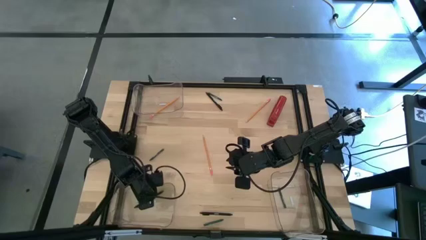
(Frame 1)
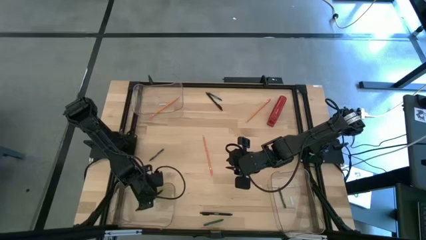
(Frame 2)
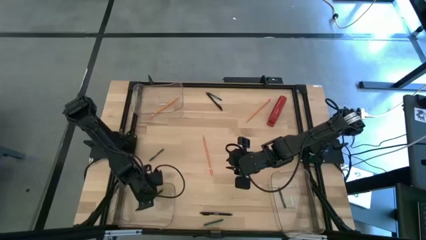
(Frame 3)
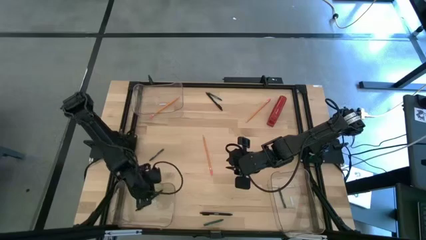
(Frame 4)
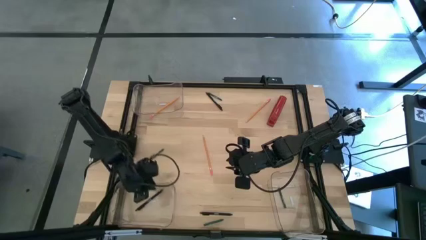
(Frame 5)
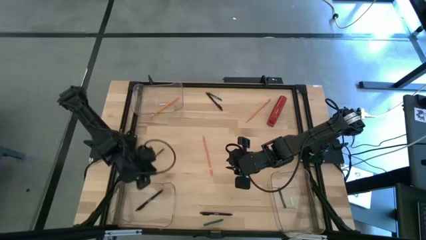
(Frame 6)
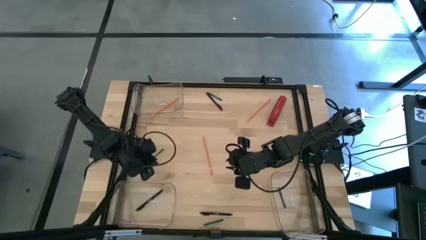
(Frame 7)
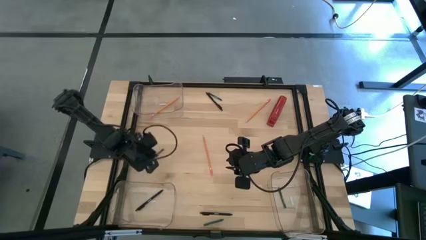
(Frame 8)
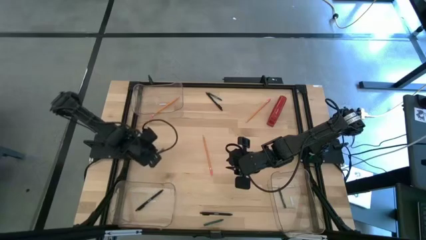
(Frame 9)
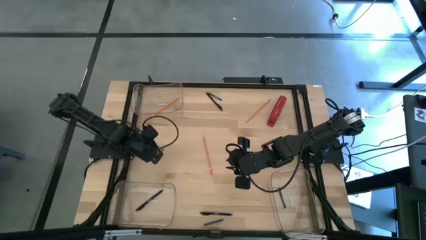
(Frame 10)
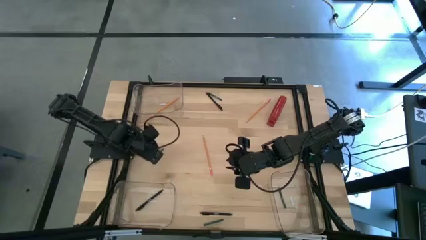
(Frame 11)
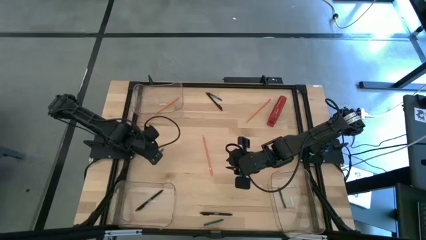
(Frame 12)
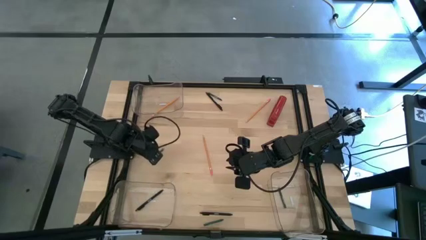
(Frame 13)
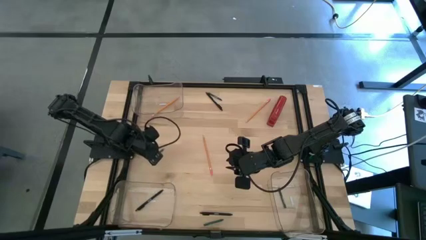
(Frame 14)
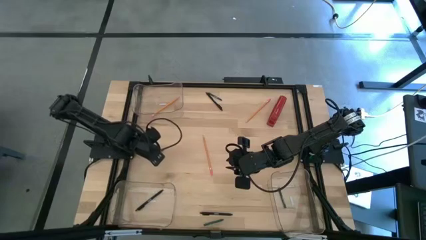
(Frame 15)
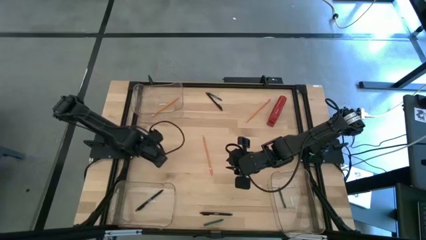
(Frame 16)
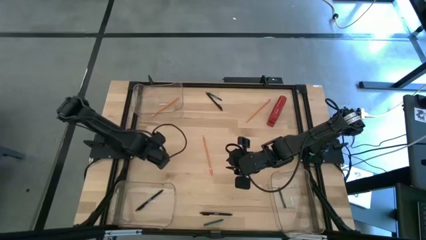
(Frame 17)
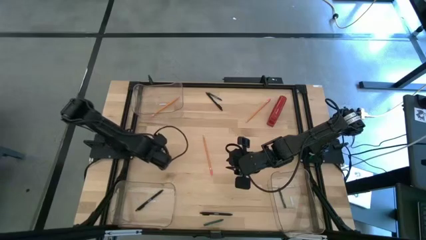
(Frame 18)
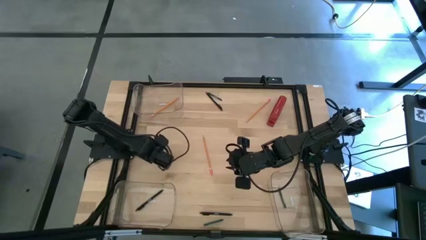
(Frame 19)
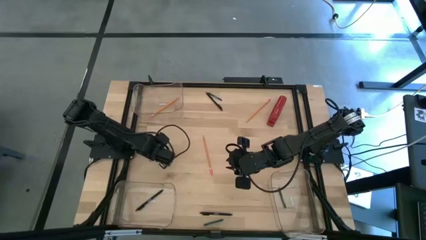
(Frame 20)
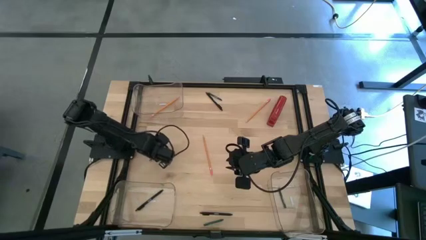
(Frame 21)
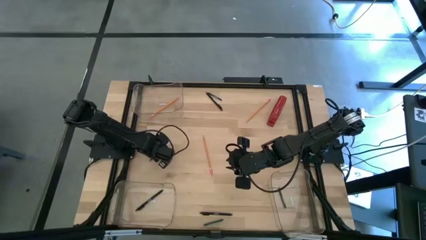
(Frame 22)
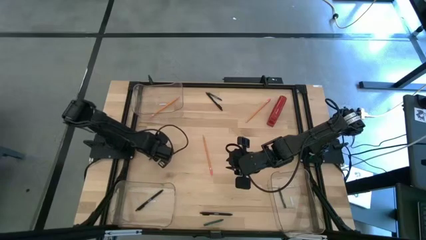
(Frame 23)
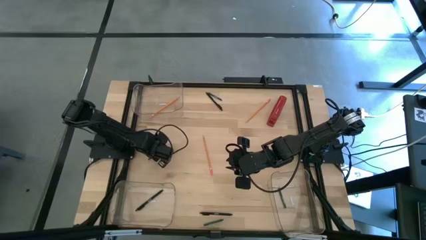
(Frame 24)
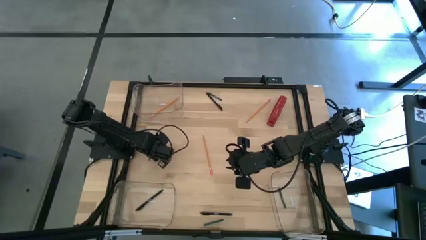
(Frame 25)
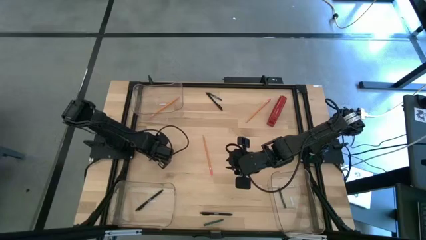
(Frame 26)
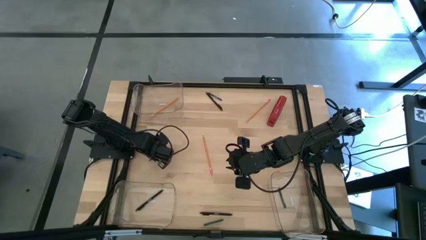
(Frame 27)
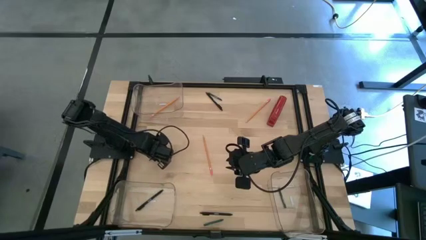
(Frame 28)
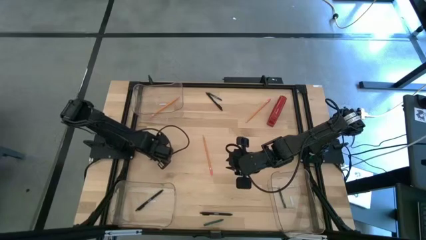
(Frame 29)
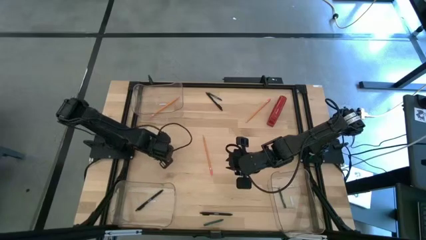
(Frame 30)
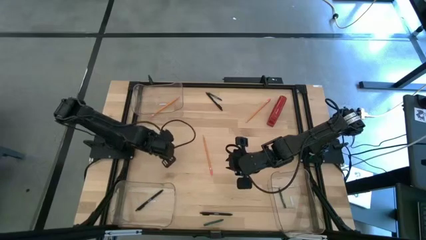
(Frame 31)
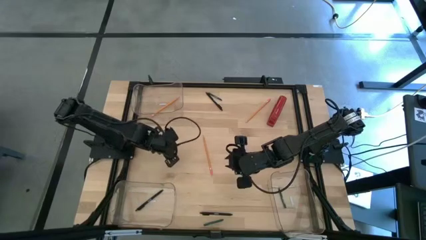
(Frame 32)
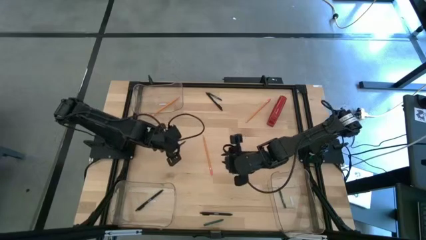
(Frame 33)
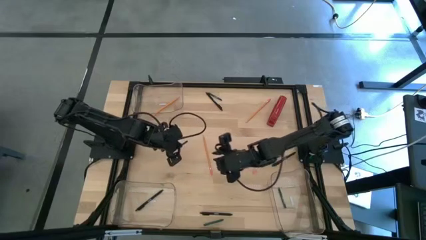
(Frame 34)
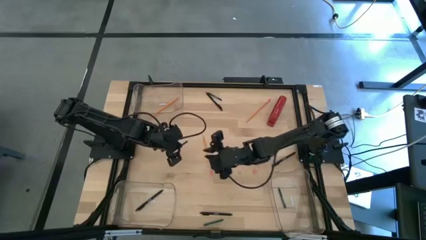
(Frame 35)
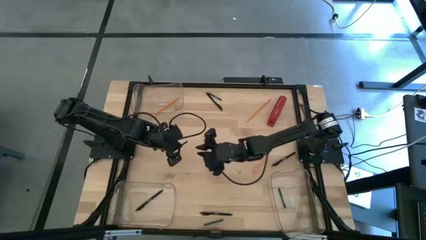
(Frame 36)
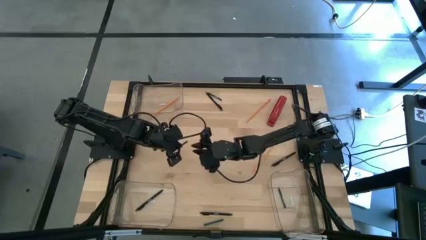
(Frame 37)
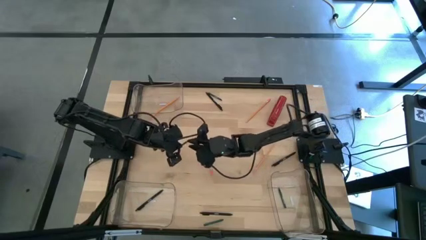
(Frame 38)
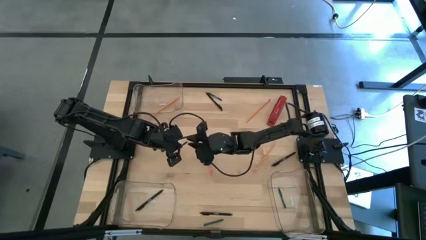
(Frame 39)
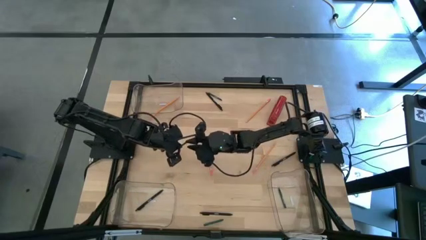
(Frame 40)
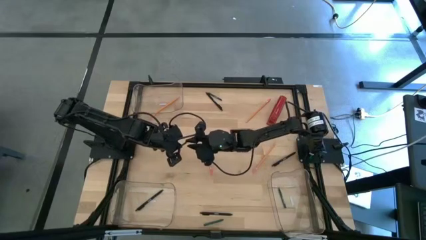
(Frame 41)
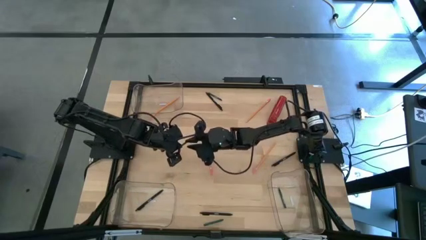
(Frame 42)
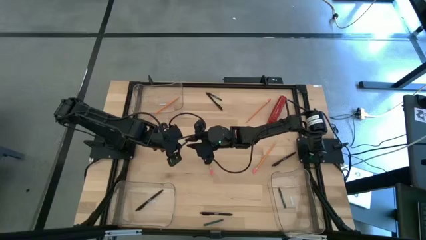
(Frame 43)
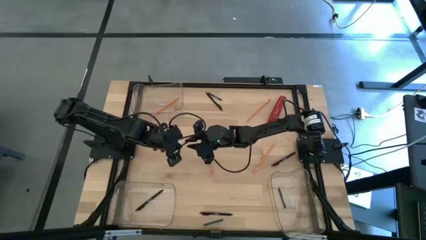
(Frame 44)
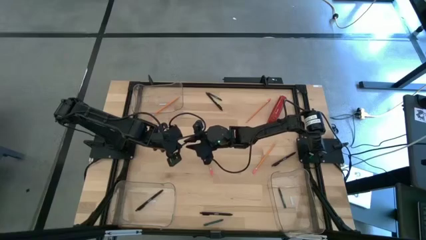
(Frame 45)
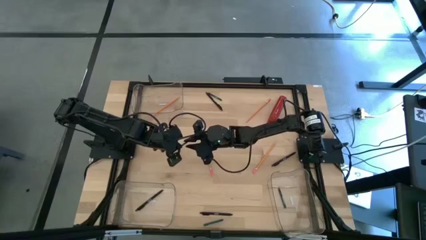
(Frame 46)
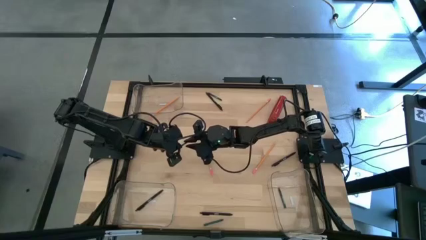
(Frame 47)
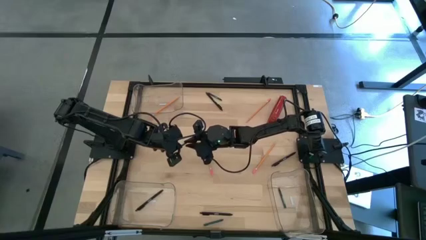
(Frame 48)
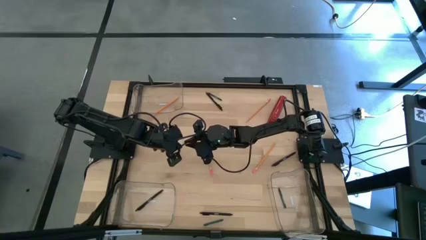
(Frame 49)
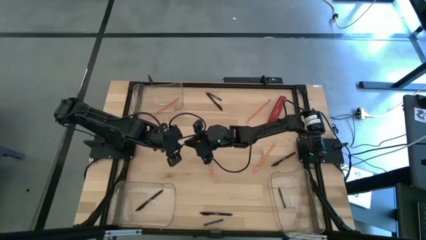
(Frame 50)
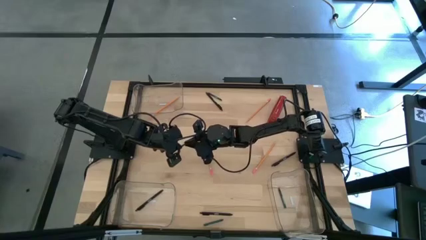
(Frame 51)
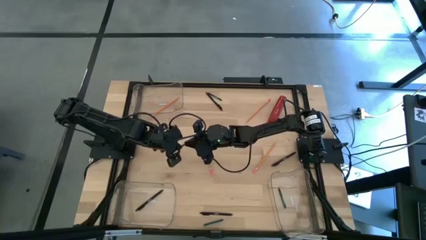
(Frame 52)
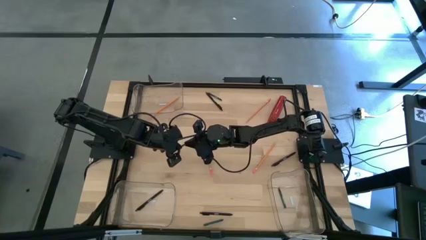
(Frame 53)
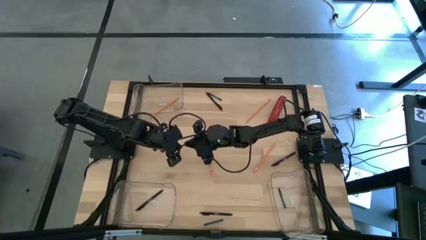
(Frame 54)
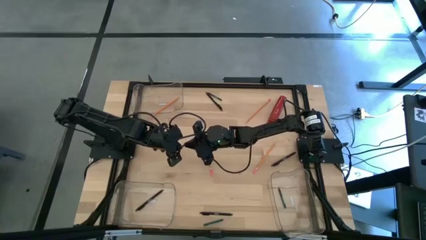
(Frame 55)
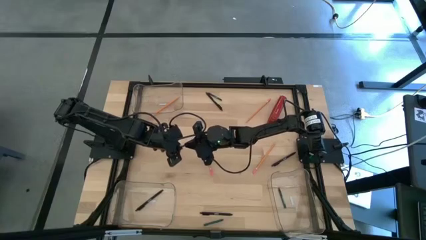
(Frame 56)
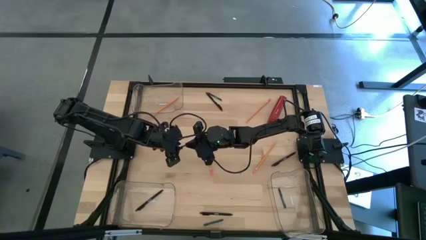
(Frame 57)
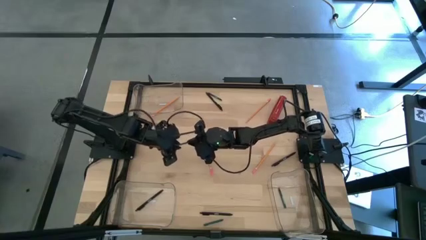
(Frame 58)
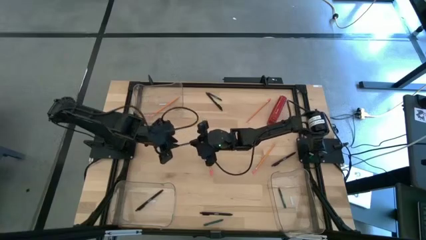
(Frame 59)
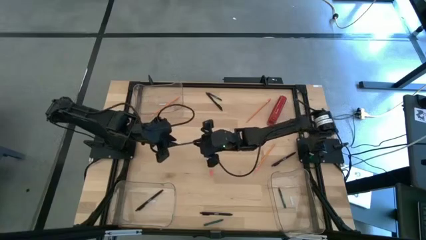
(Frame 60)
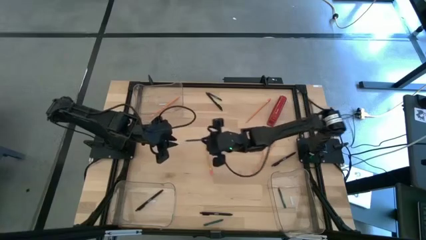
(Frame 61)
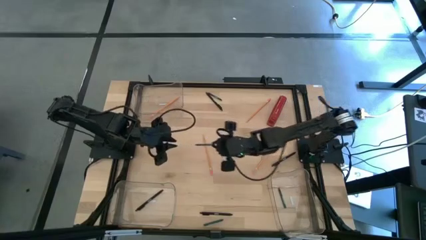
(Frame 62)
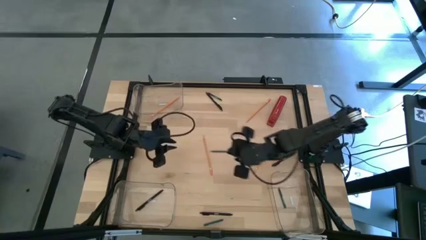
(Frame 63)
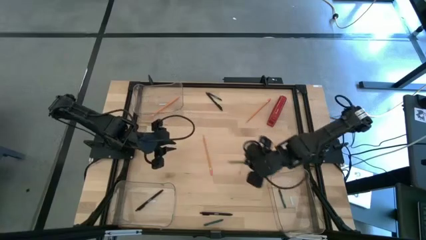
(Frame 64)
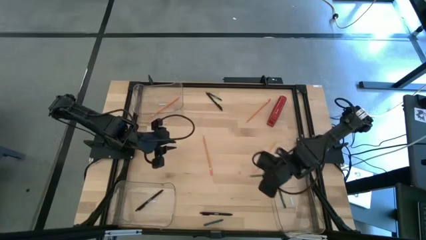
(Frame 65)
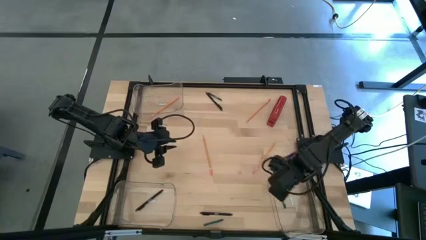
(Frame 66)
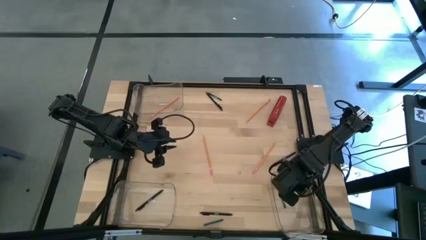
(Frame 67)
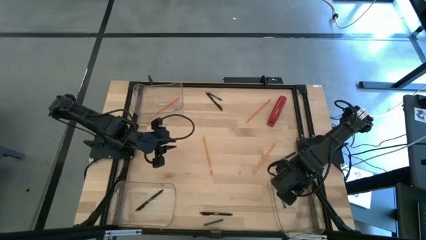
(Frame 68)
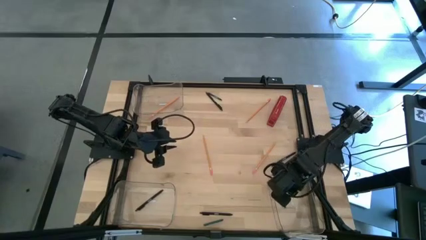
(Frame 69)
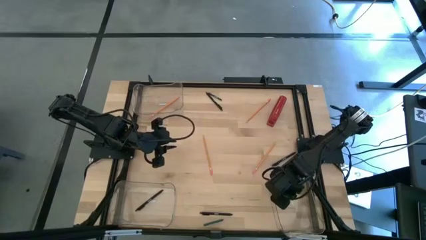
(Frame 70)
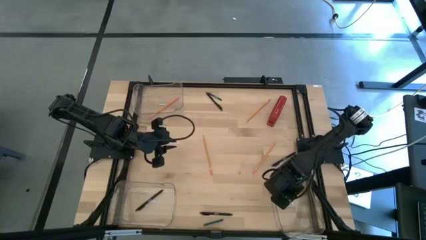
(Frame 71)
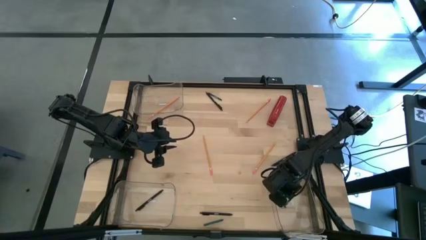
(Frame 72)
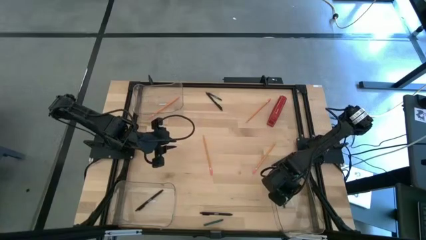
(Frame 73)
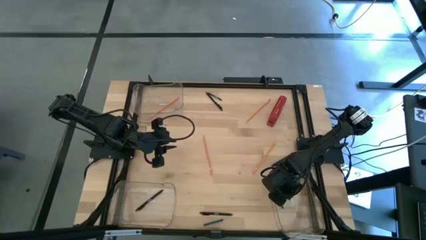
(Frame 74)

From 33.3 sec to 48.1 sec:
Task: Sort crayons/erasers/pens/pencils in bins
Put the green crayon into the bottom right transparent bin
